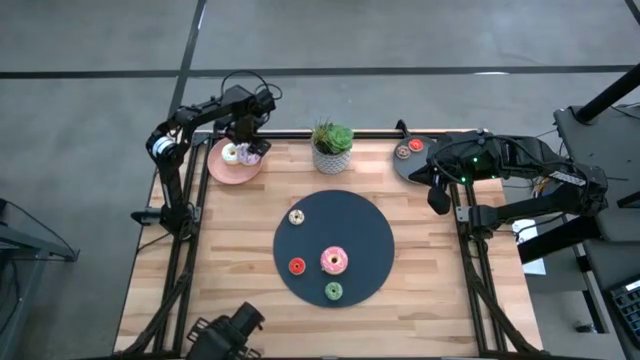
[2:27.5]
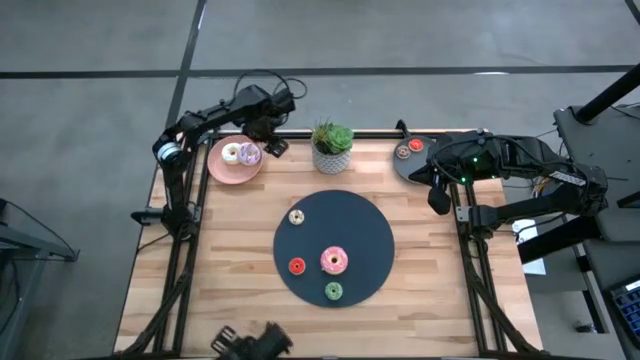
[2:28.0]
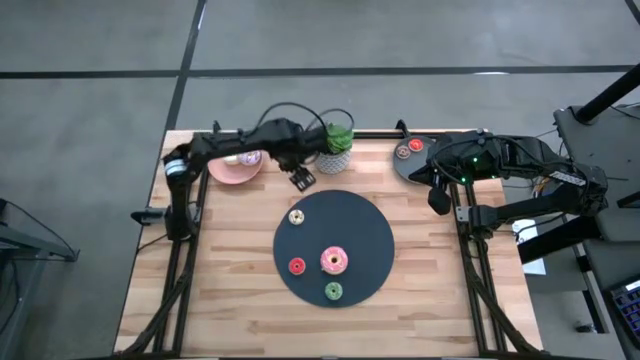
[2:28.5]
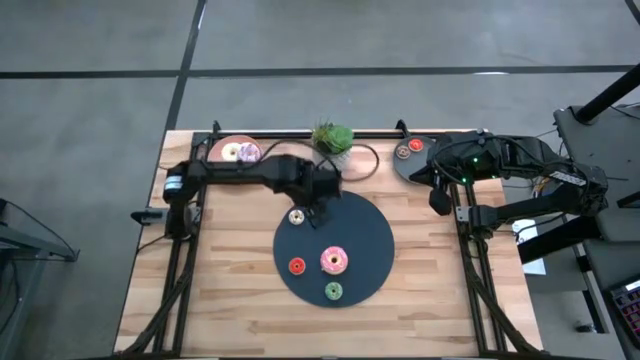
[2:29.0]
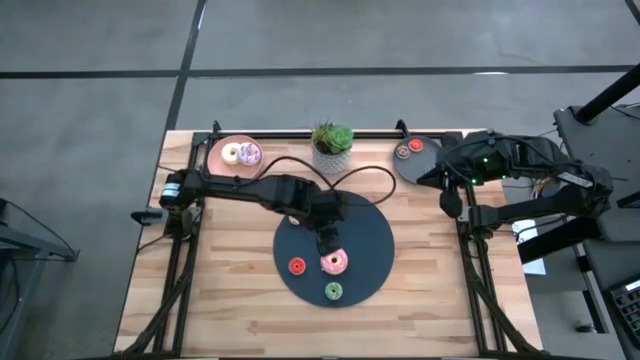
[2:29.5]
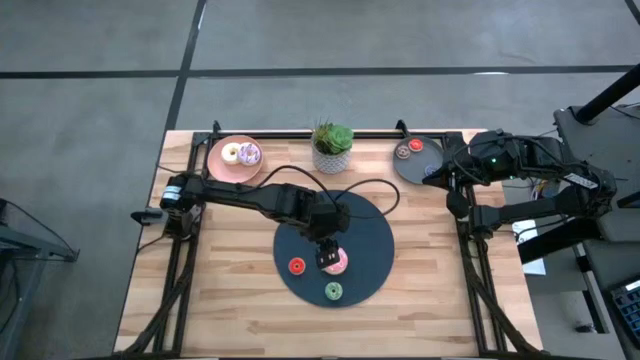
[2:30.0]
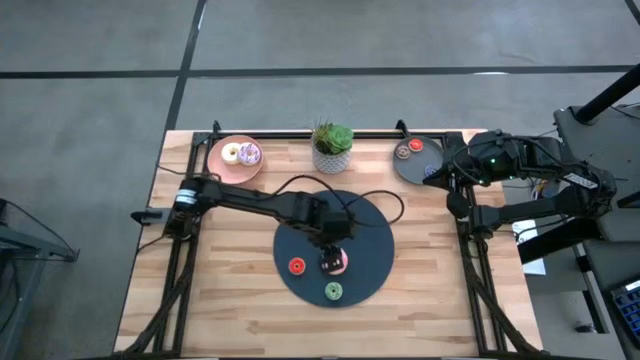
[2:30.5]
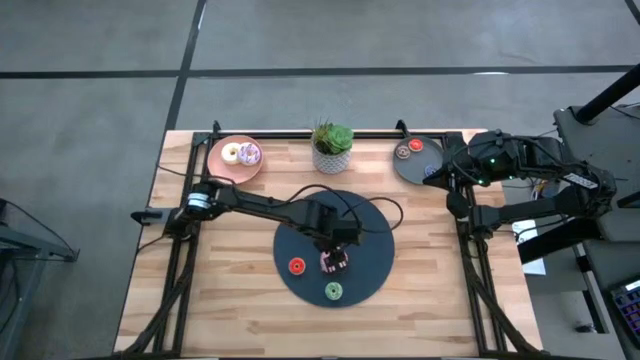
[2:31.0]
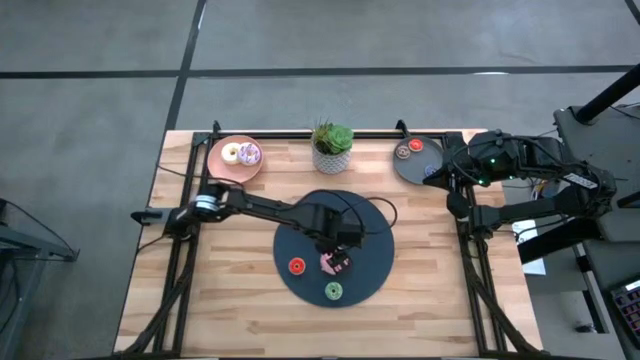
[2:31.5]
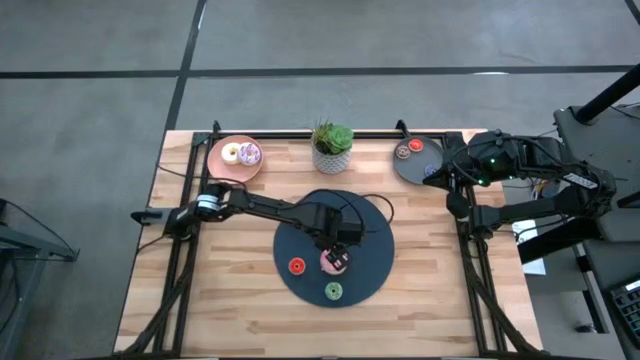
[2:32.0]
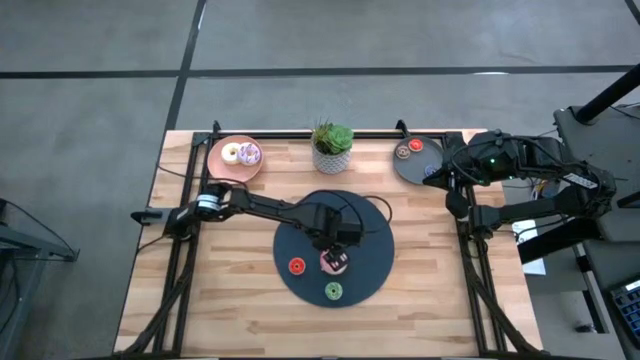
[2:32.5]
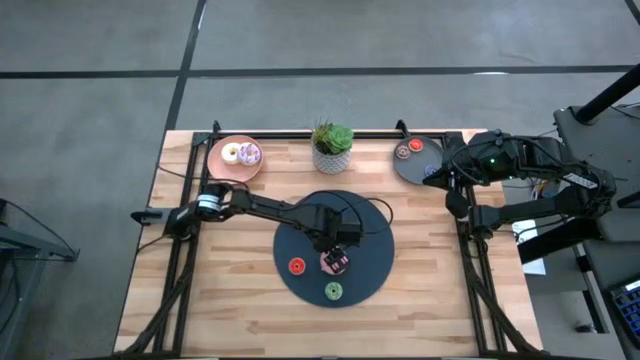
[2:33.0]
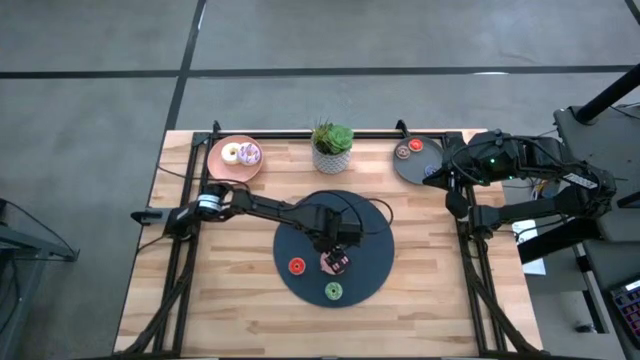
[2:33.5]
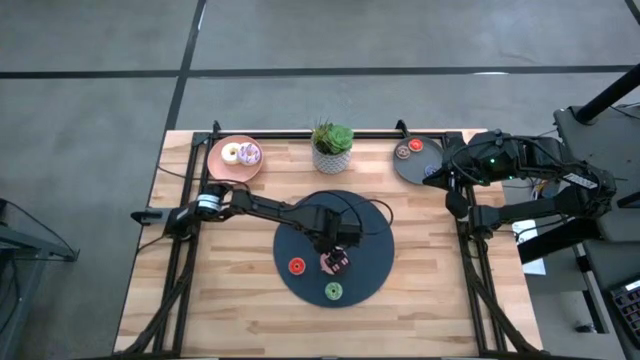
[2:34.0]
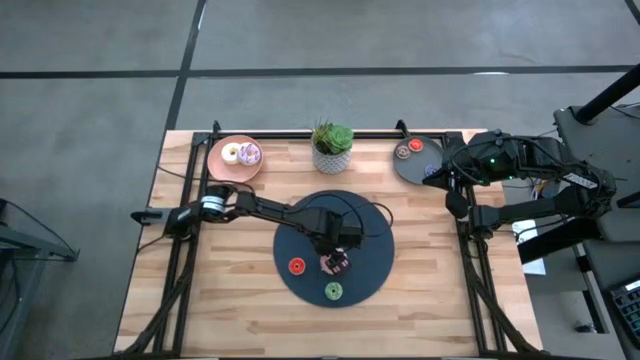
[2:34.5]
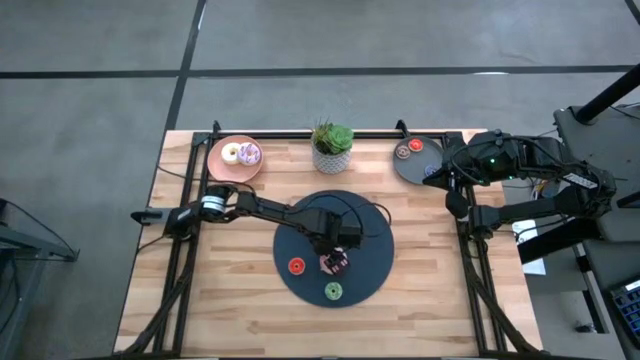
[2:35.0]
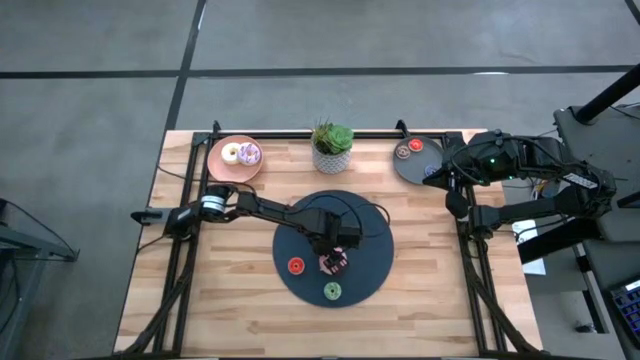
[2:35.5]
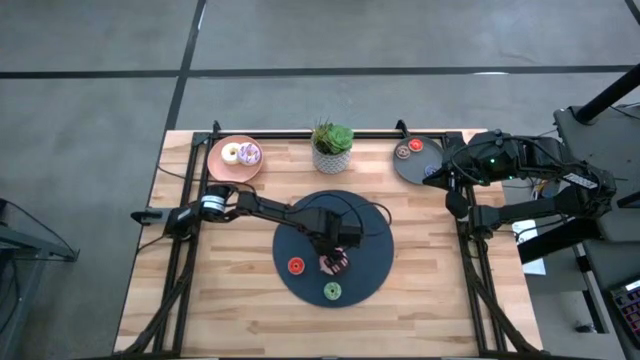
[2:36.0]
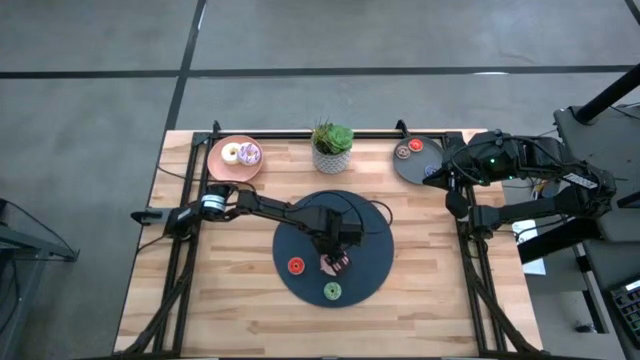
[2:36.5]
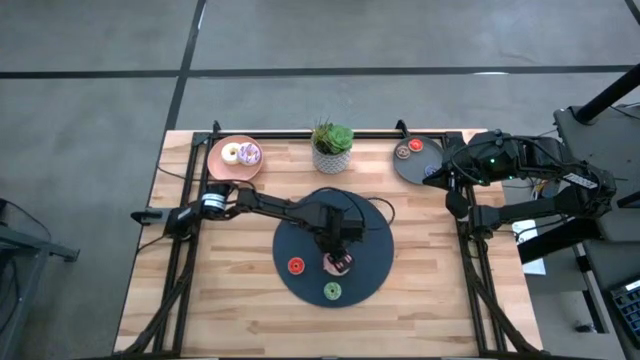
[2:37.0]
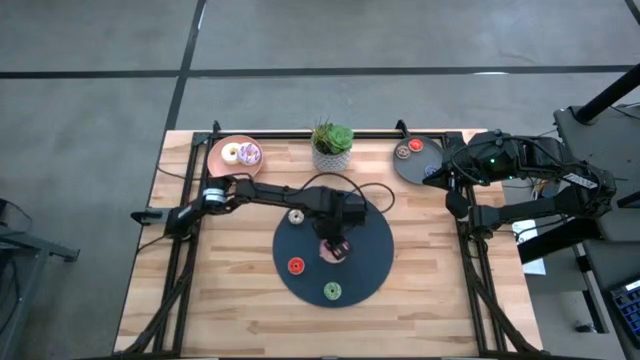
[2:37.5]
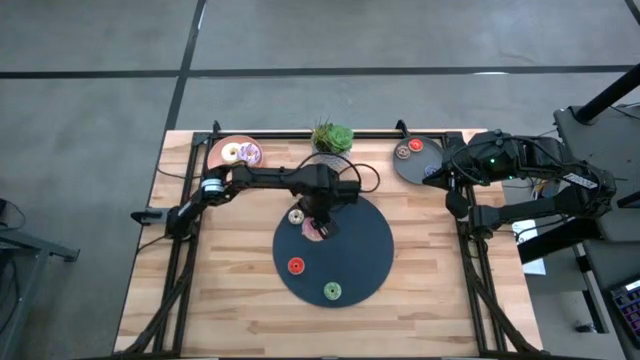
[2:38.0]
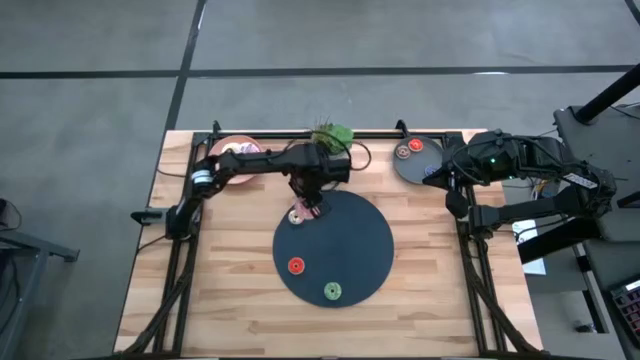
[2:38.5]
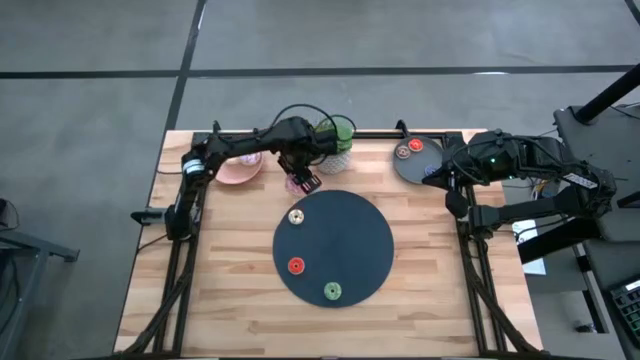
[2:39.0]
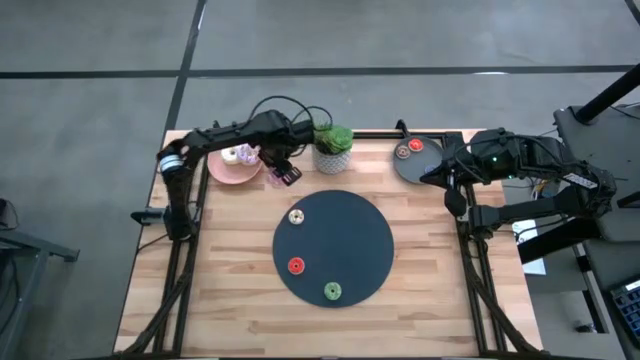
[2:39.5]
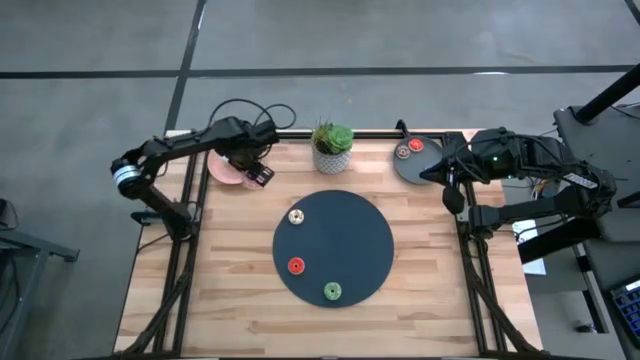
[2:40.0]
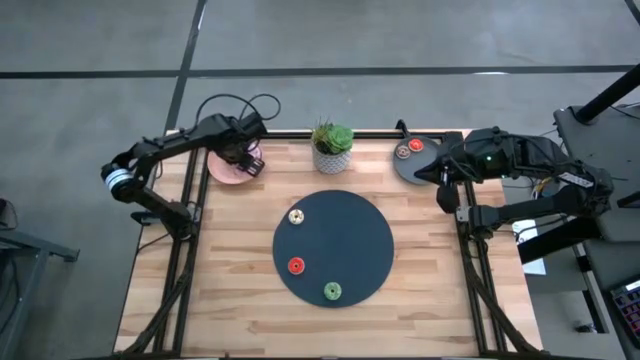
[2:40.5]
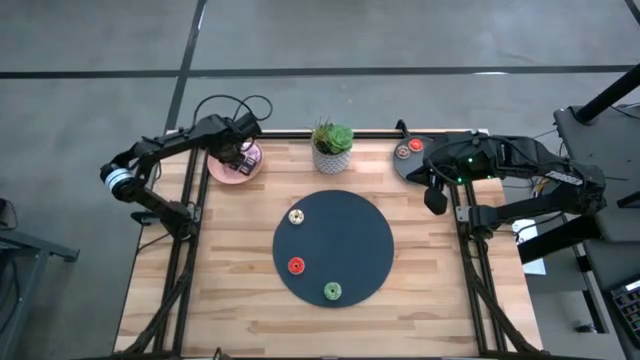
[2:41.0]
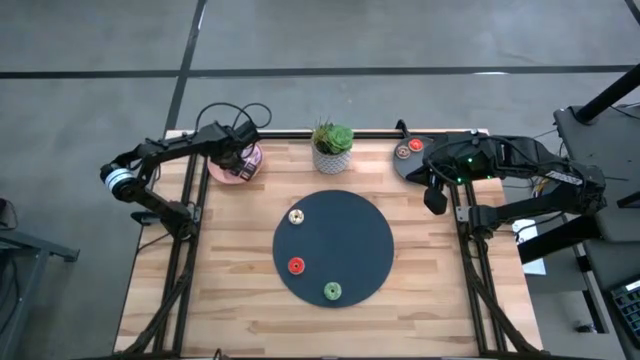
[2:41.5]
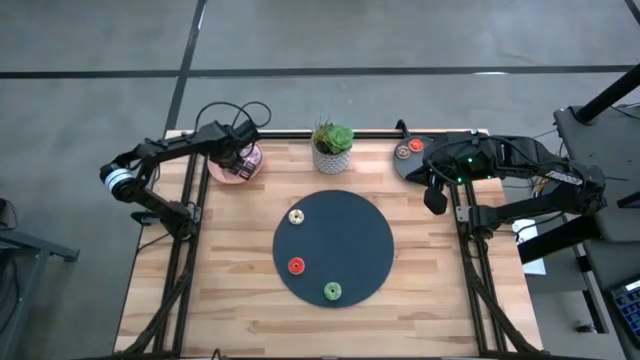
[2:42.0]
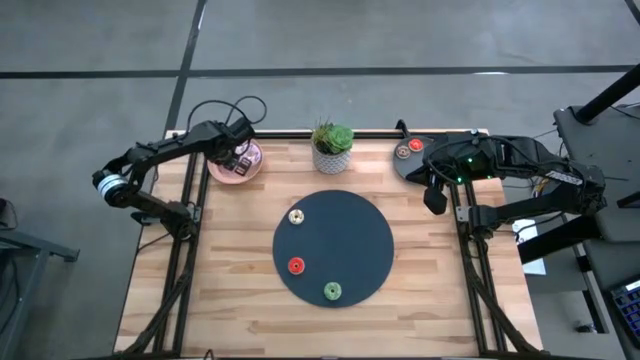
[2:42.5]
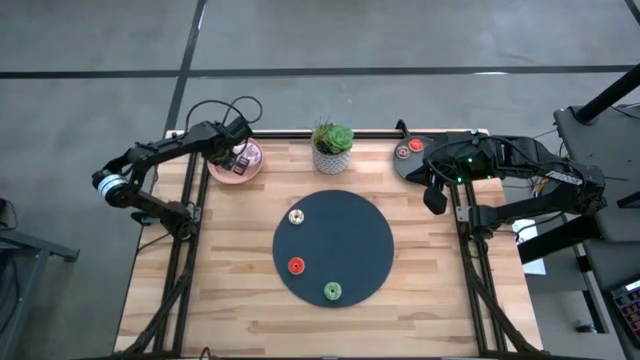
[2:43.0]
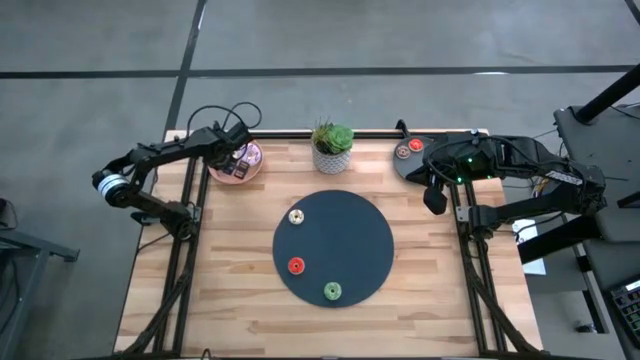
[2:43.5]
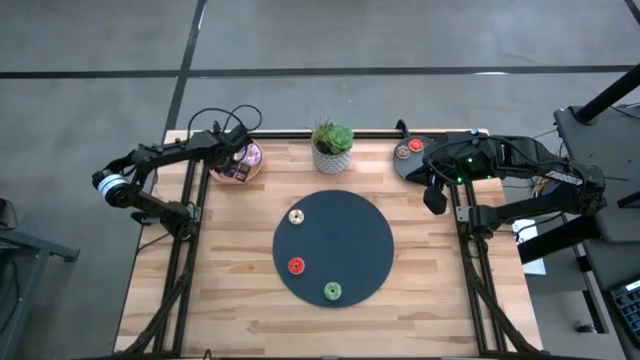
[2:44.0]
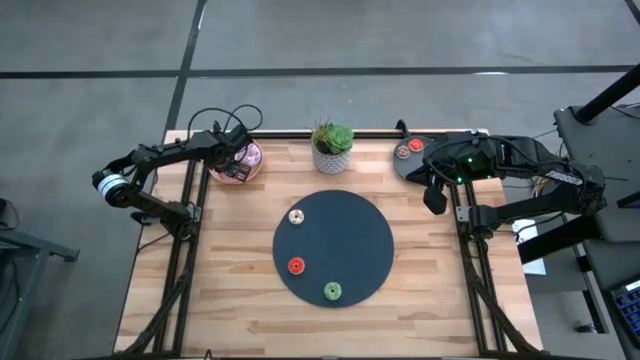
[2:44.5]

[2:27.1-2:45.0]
Task: Pick & Place donuts
Put the large pink donut on the pink plate

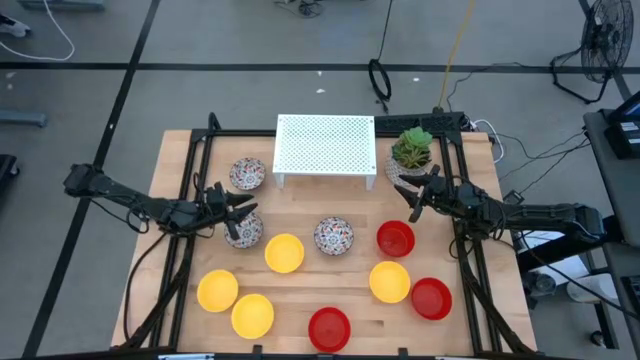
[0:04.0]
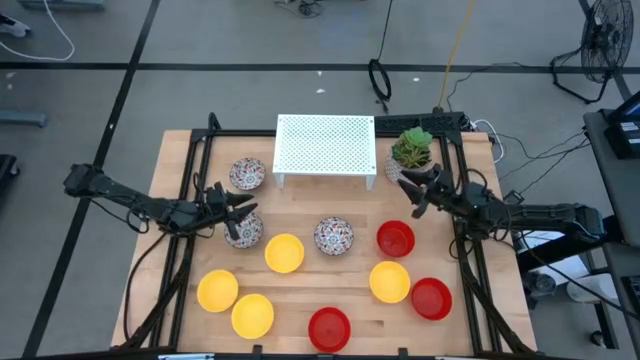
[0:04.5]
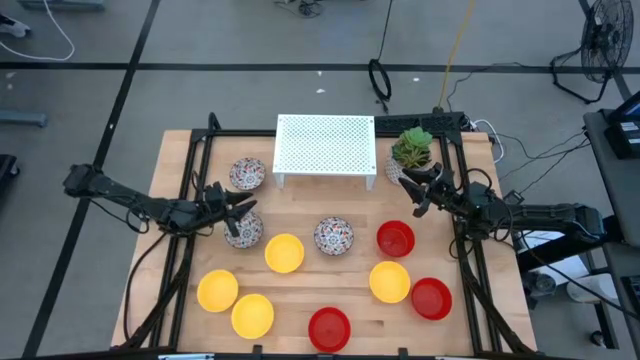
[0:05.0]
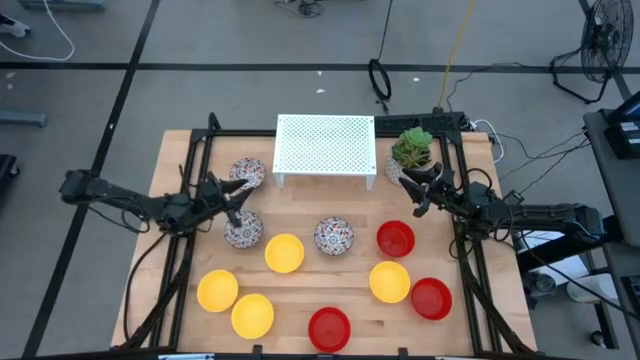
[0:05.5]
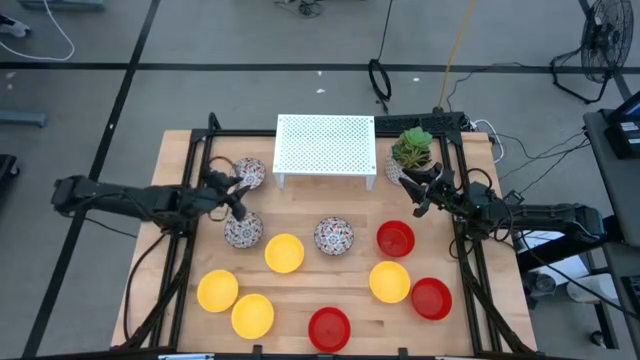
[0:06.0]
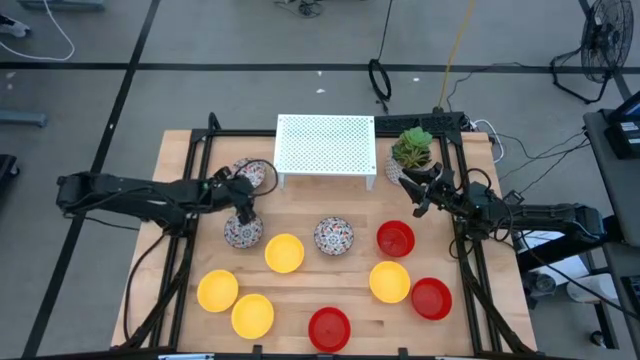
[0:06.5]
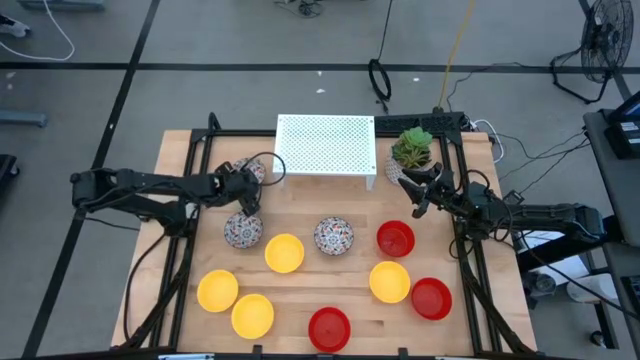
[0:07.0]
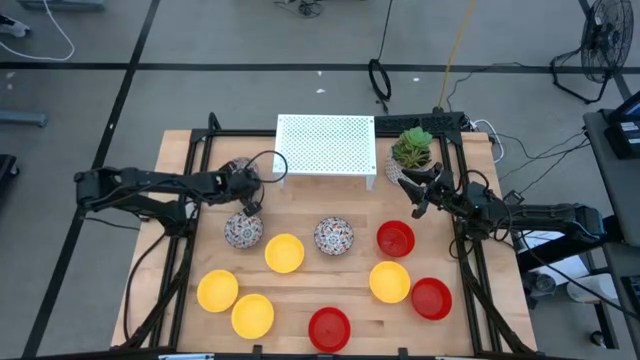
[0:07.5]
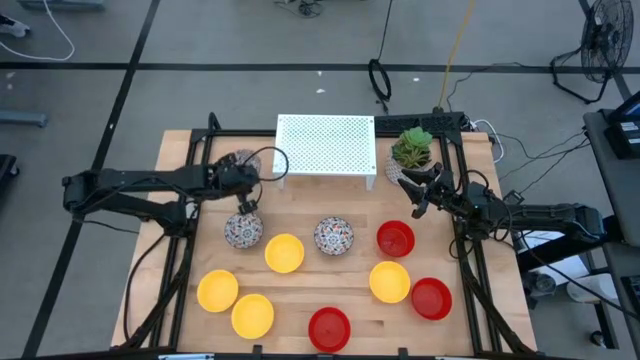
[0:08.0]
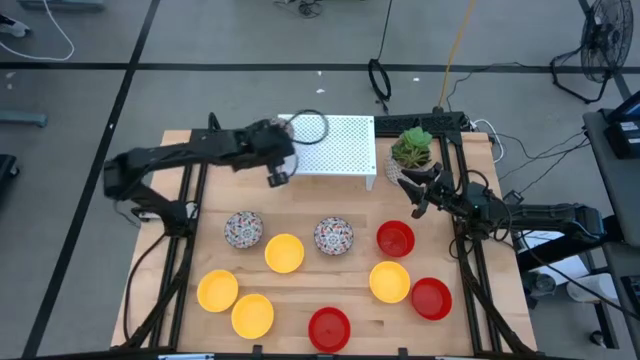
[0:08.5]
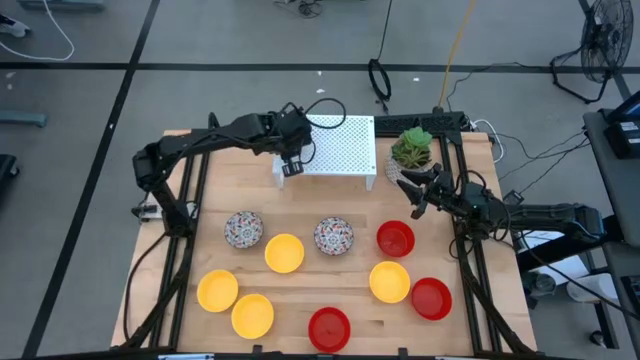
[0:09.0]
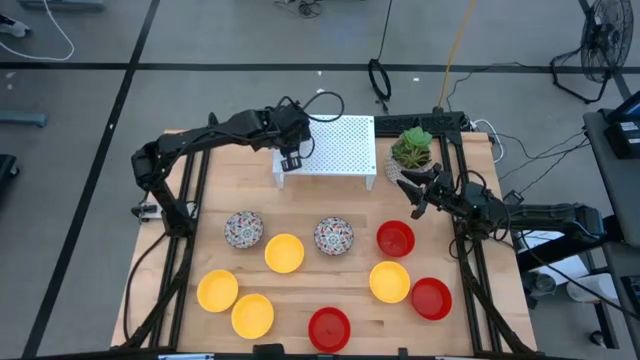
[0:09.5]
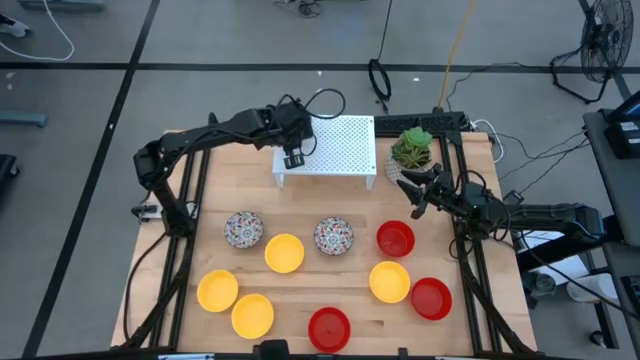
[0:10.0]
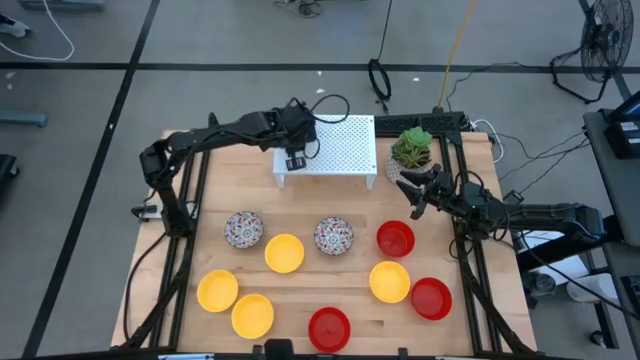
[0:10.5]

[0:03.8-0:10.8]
Task: Pick & Place Mini bowls
Put the white patterned bowl on the shelf
